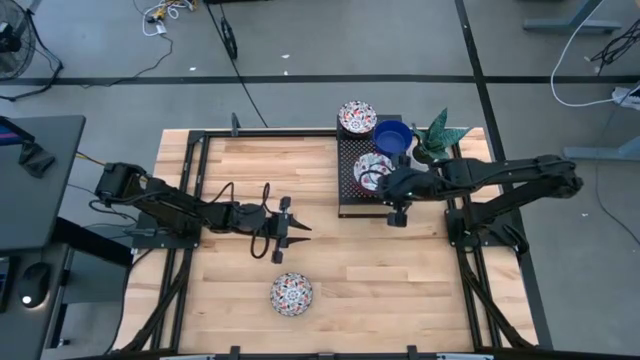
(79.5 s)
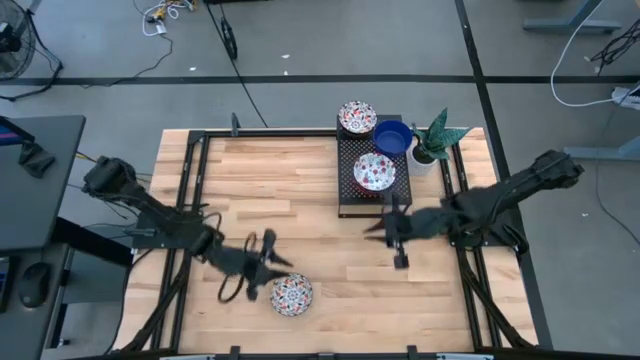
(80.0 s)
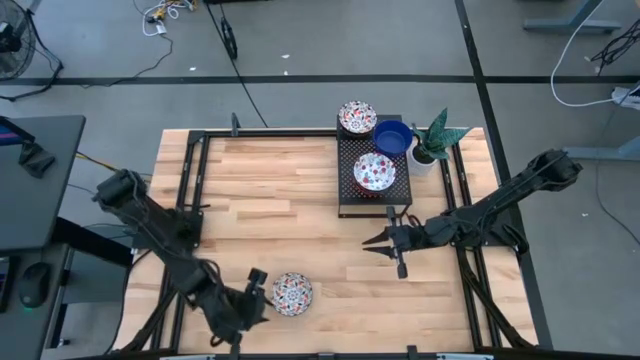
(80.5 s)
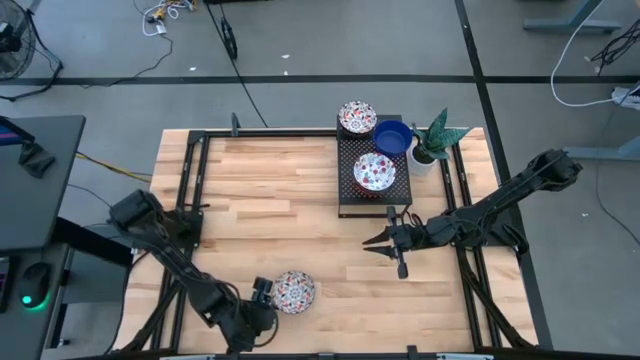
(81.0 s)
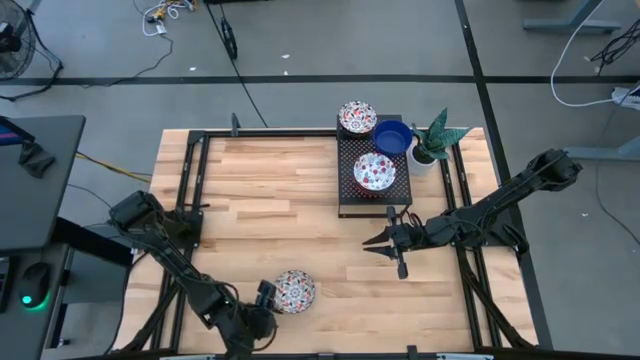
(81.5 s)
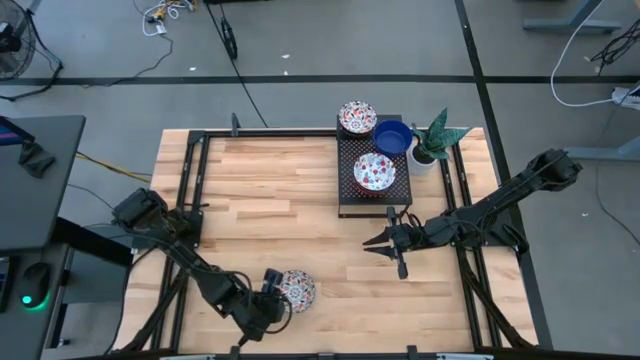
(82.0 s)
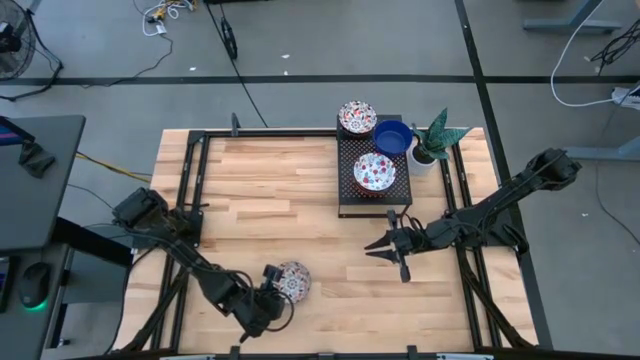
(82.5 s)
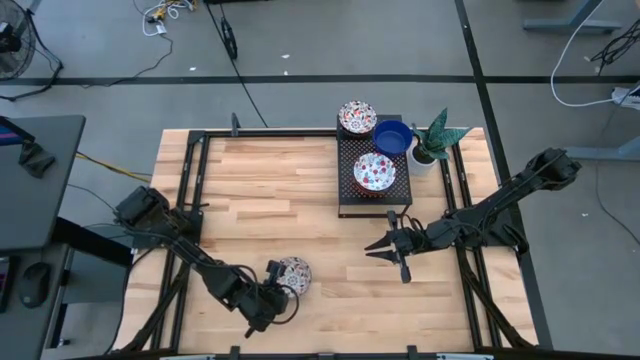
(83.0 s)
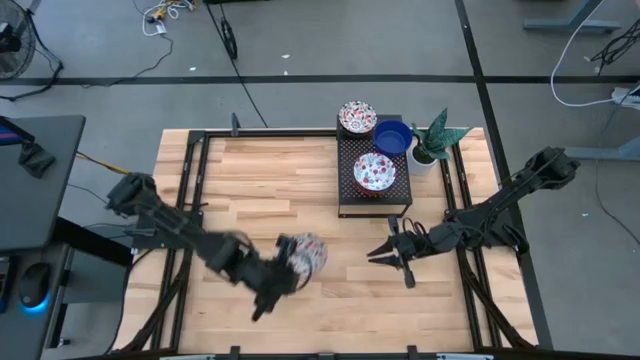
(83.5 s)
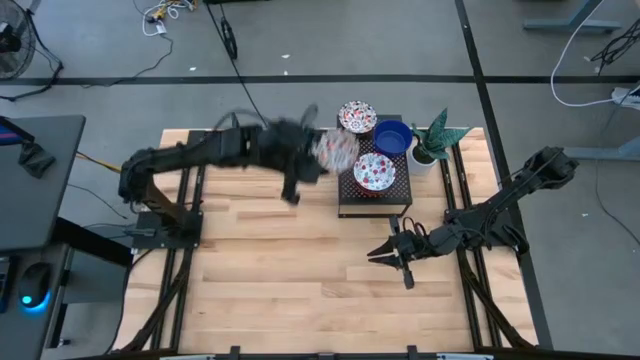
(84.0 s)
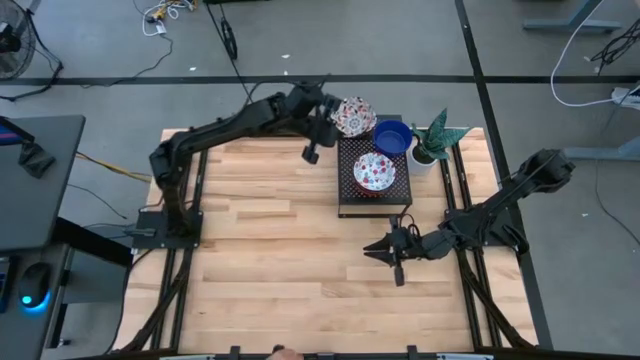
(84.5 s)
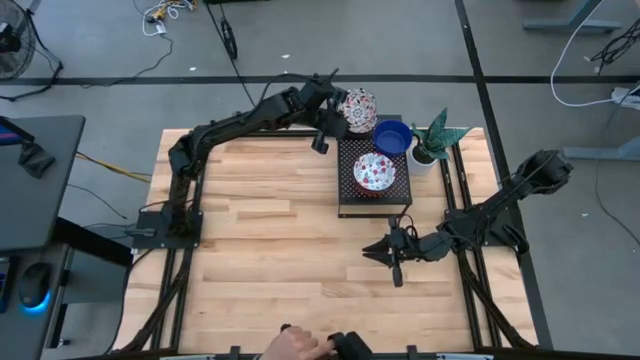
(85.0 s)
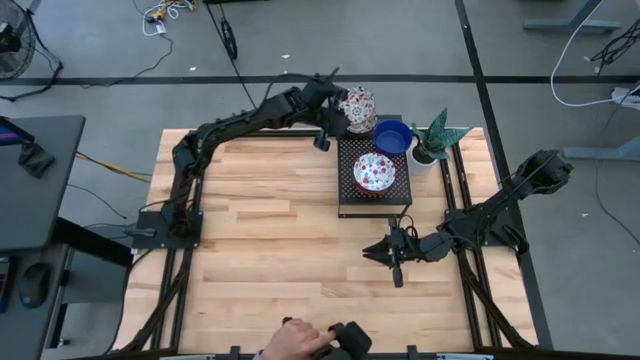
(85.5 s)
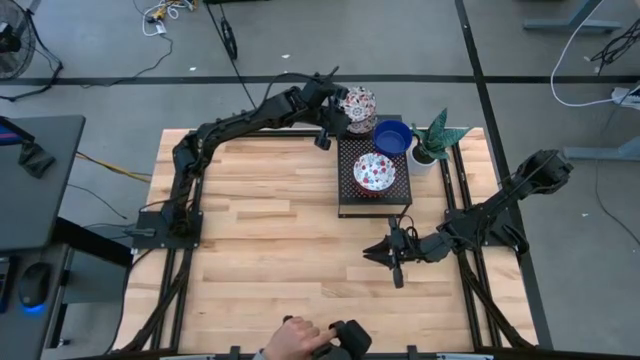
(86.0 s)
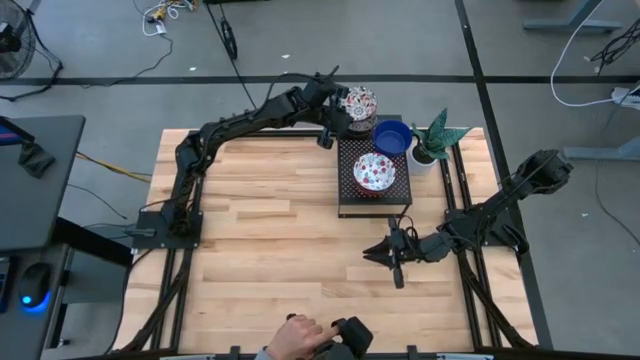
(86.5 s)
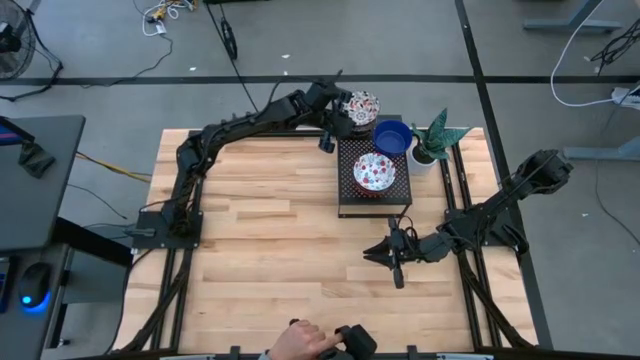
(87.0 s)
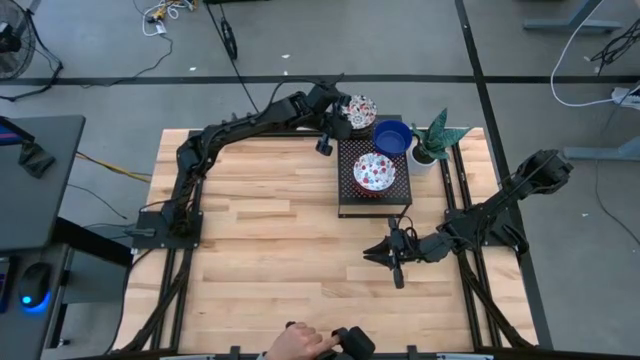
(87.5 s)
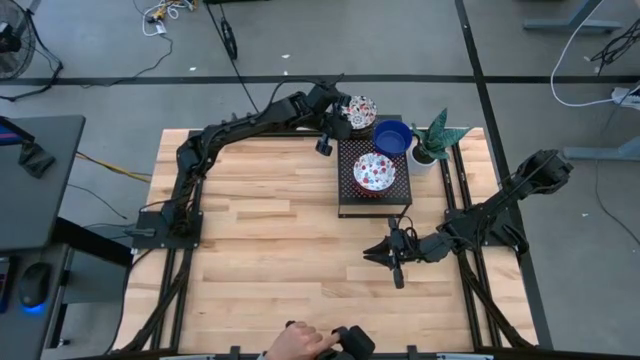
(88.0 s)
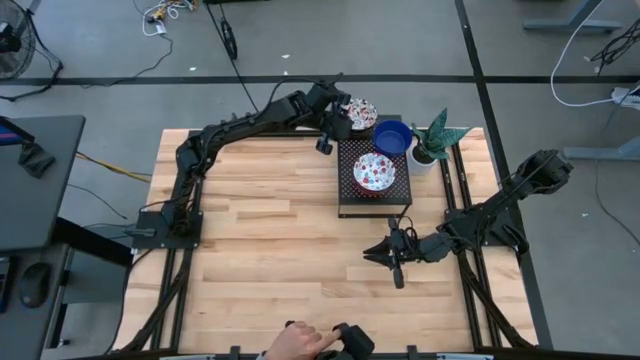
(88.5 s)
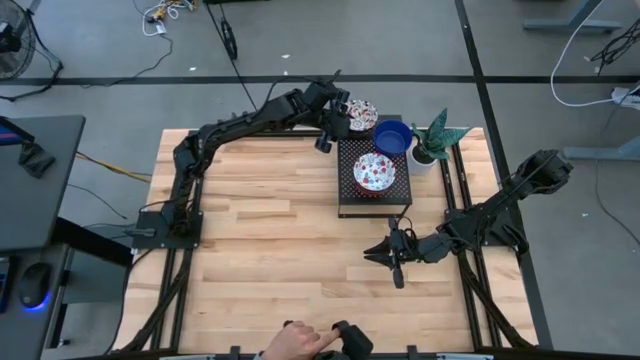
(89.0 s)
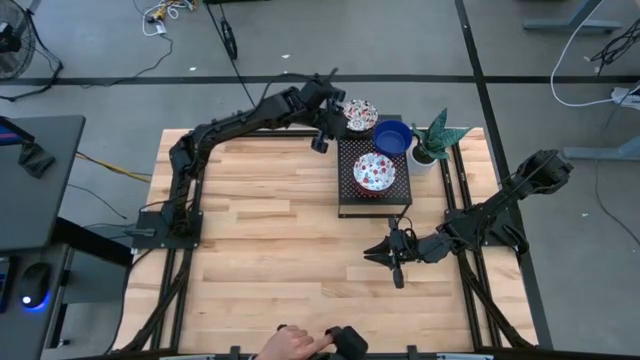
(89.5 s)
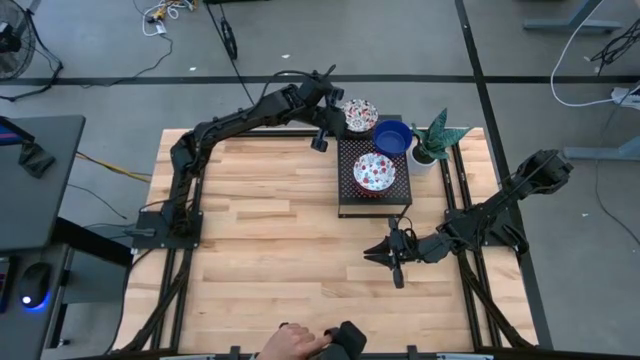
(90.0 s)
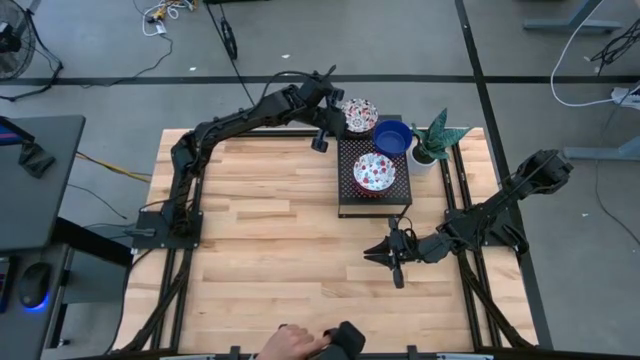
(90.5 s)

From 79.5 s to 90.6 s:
Task: Pick & Place Mini bowls
Stack the orange patterned bowl on top of the other orange patterned bowl on the shelf

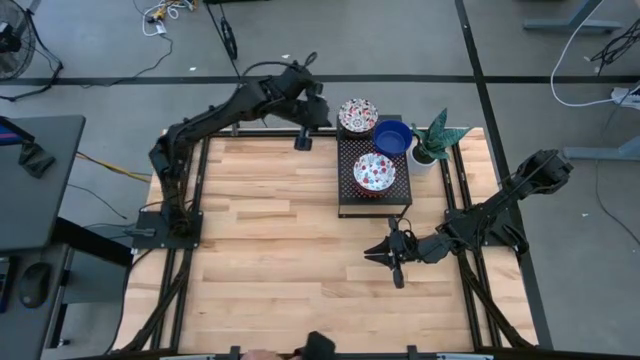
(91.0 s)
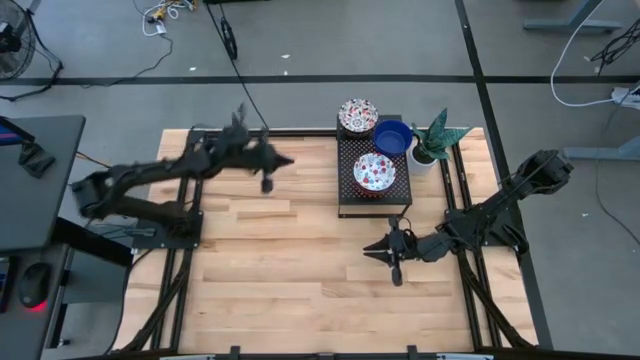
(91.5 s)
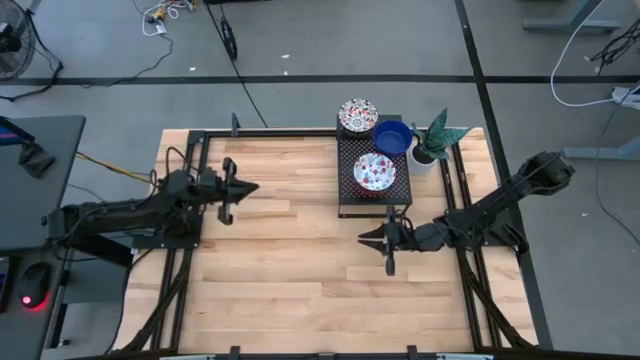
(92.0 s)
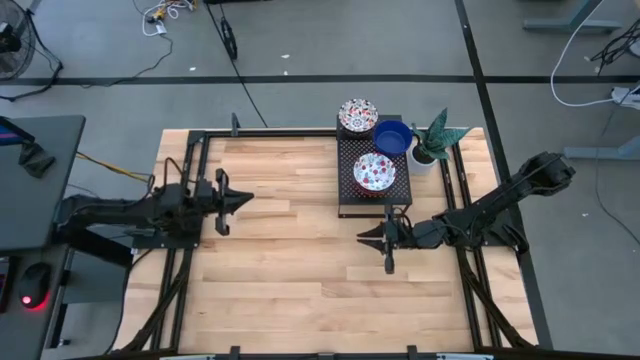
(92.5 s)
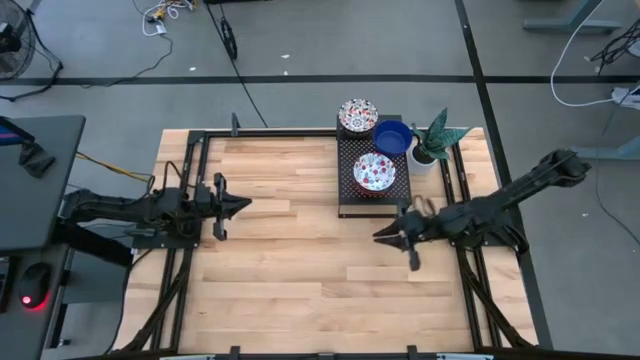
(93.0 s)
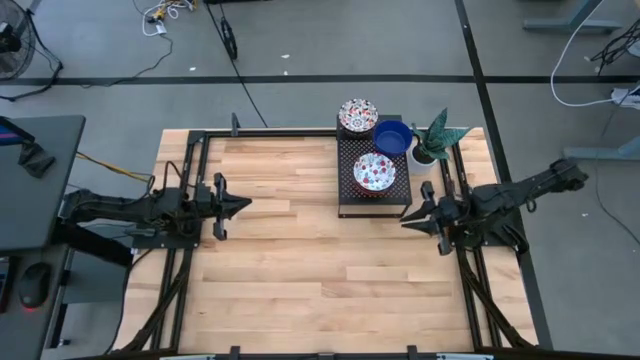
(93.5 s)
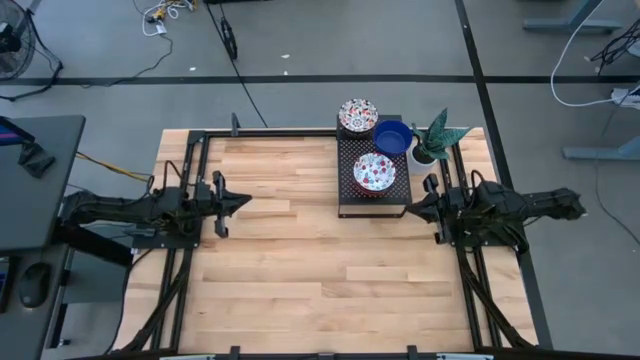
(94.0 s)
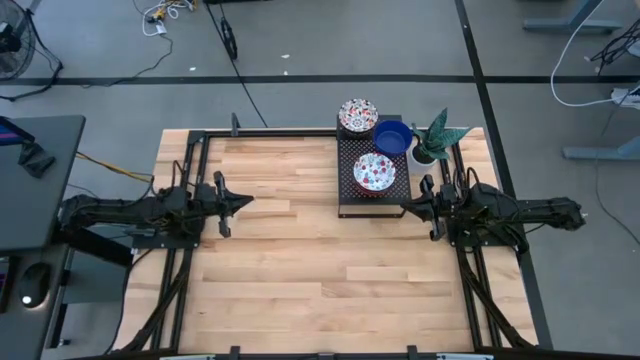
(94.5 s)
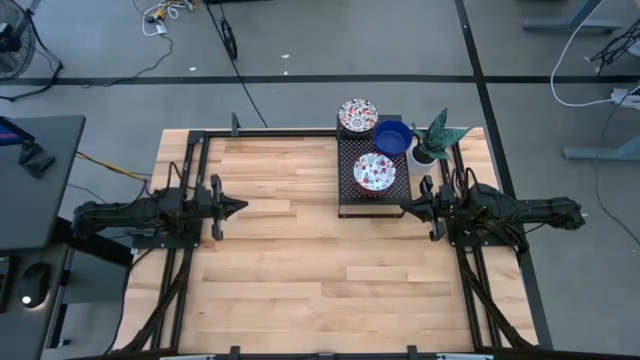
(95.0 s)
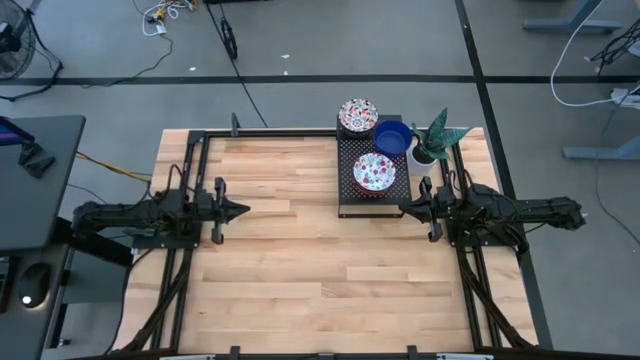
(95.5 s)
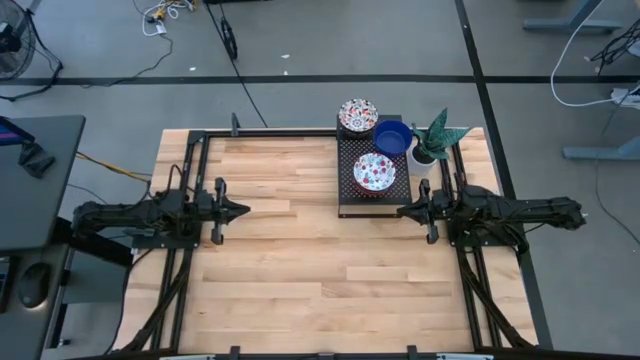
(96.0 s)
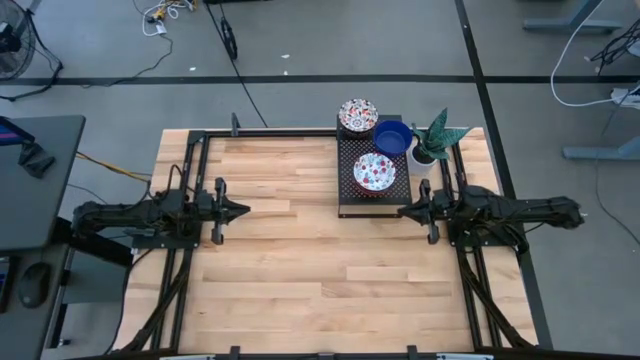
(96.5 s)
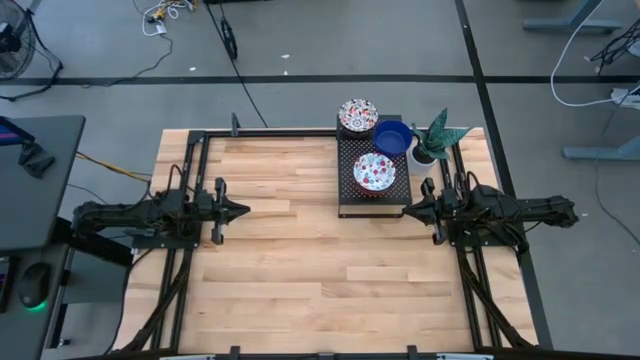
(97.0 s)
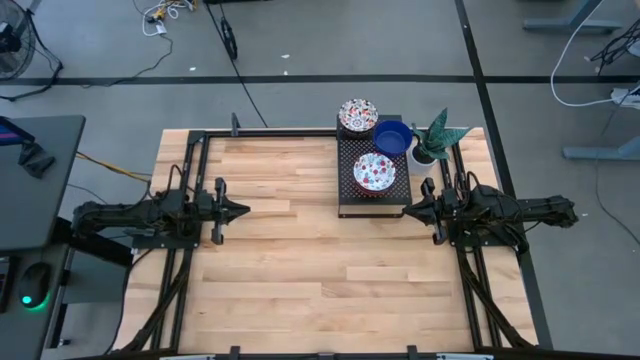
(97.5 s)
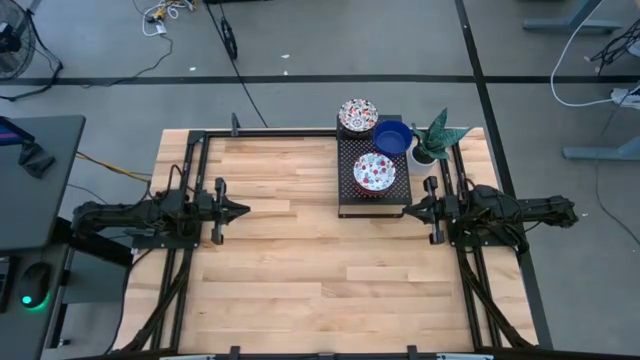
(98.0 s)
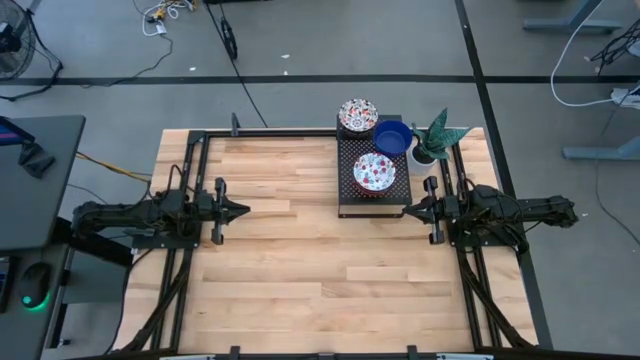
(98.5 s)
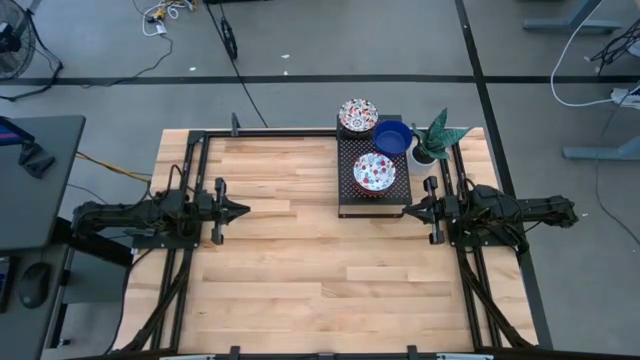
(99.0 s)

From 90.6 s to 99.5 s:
Return to Home Position

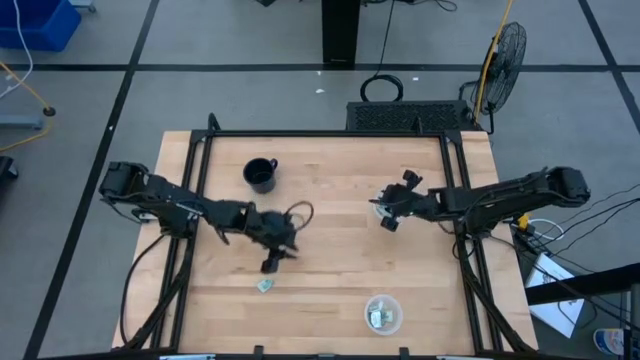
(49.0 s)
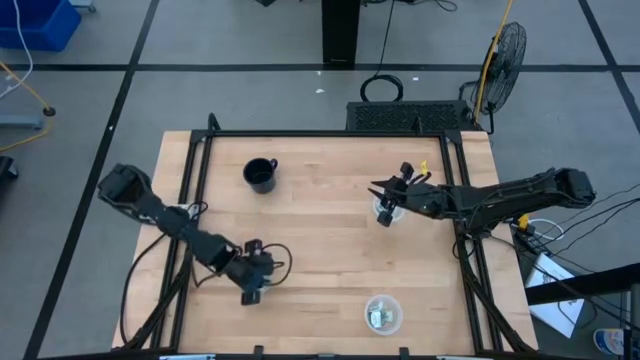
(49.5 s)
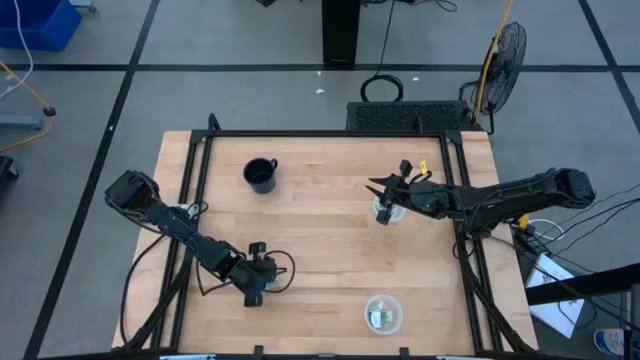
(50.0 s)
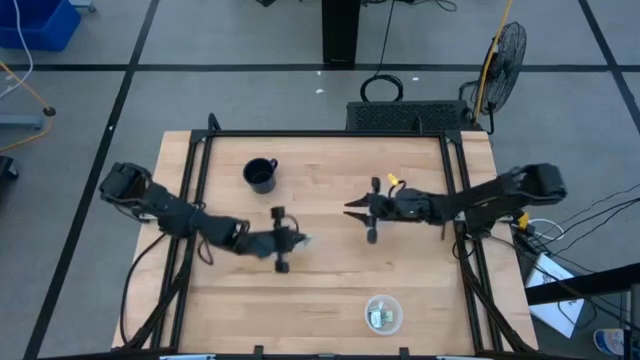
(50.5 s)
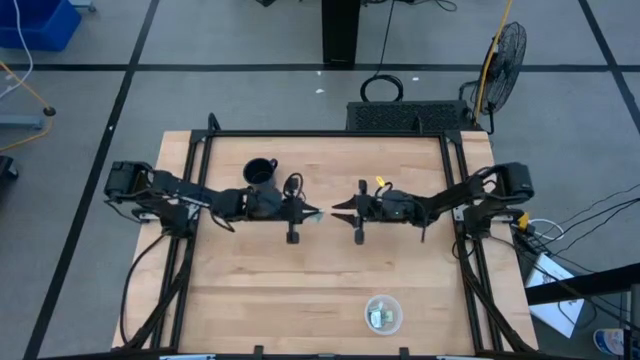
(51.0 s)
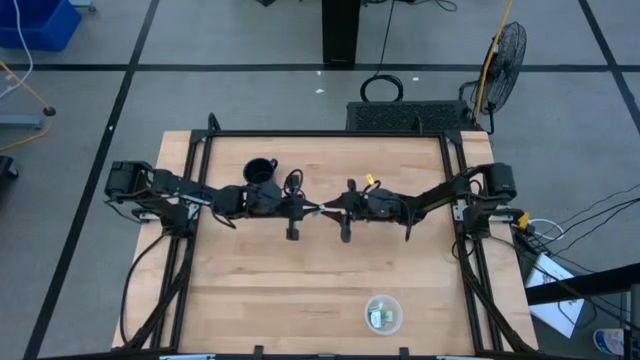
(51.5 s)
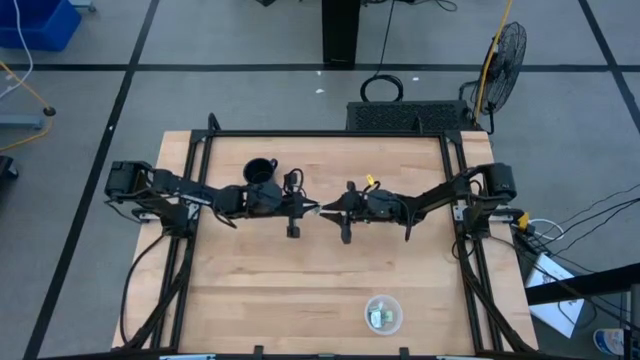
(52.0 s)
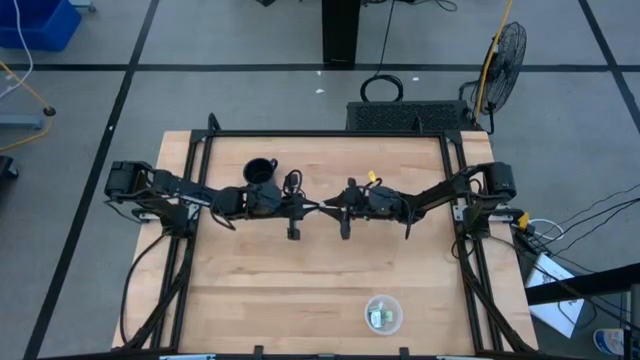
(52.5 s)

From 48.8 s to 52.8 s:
Task: Pick and place Stevia / Truvia into bins
Put the light green stevia packet into the bottom transparent container
